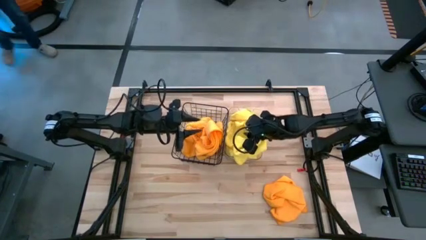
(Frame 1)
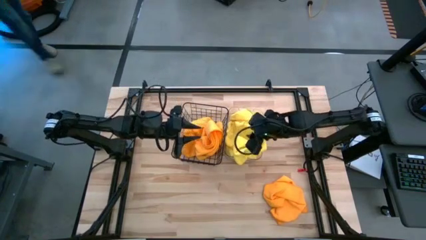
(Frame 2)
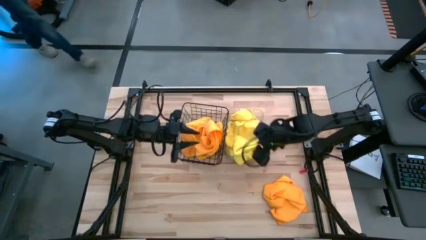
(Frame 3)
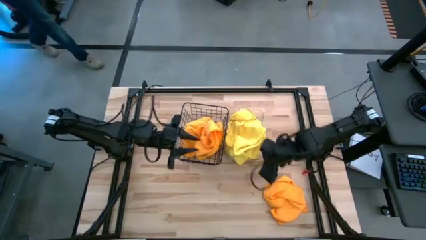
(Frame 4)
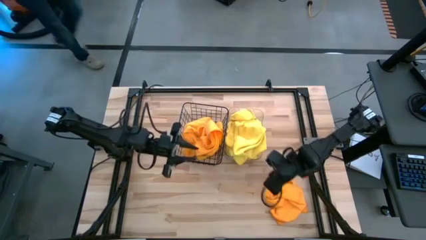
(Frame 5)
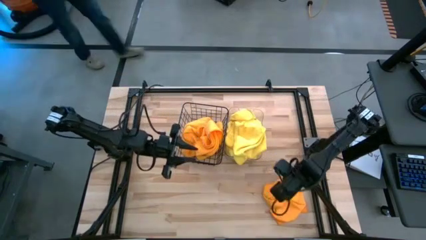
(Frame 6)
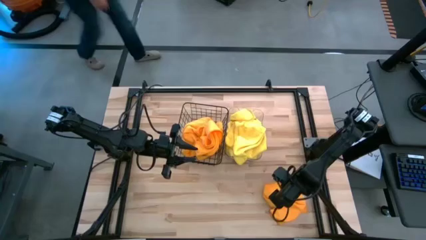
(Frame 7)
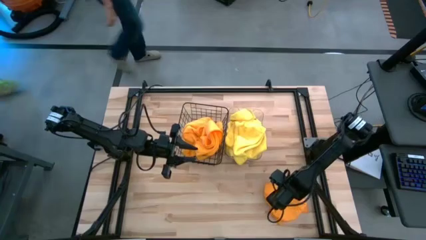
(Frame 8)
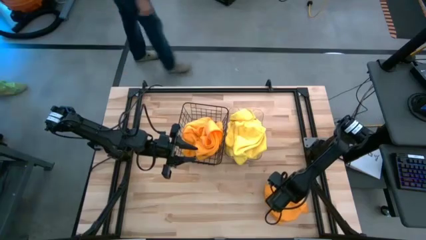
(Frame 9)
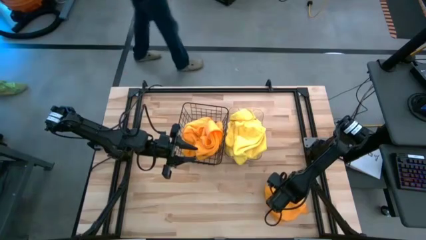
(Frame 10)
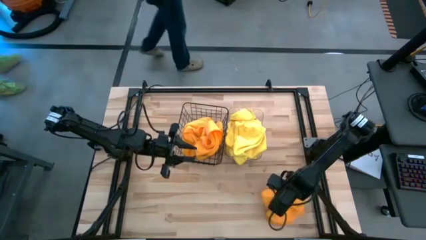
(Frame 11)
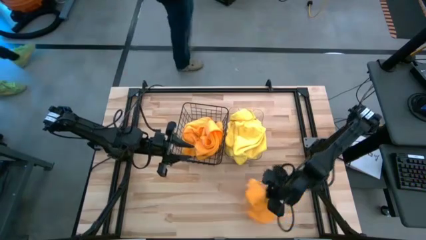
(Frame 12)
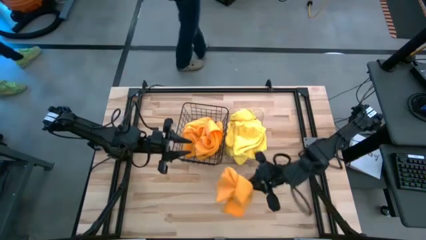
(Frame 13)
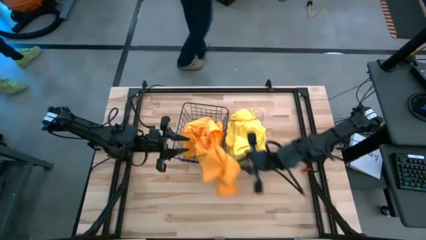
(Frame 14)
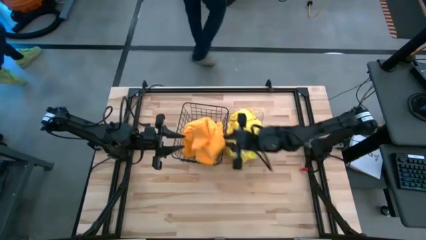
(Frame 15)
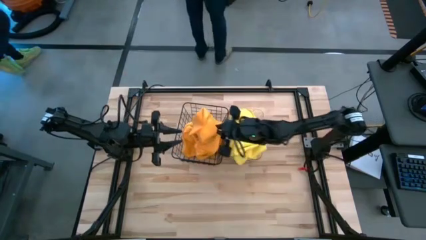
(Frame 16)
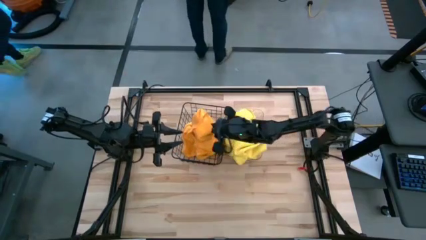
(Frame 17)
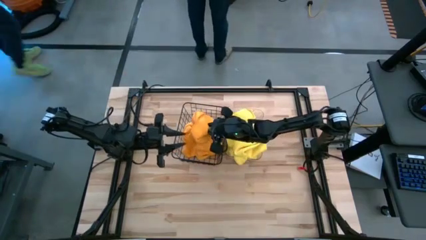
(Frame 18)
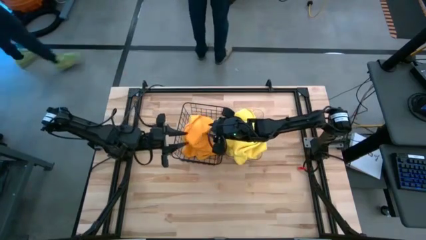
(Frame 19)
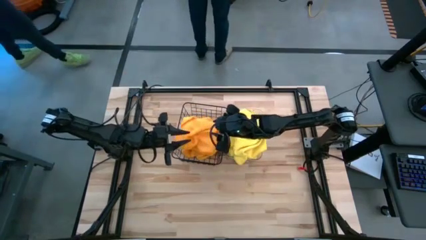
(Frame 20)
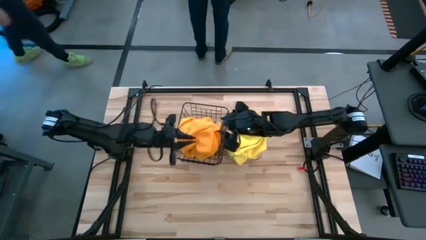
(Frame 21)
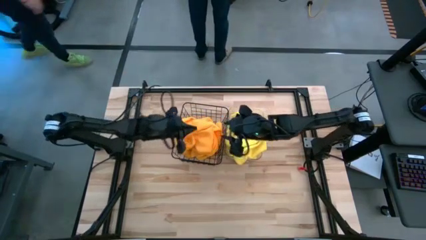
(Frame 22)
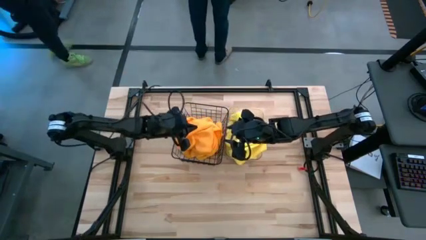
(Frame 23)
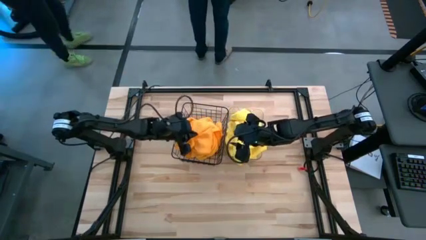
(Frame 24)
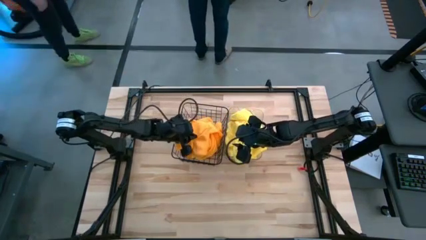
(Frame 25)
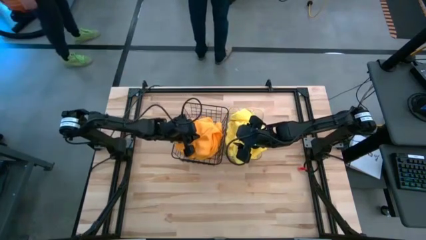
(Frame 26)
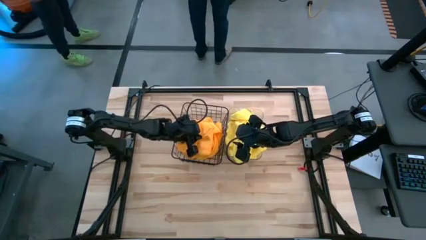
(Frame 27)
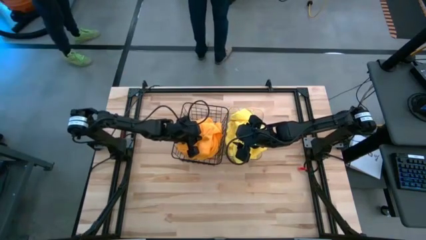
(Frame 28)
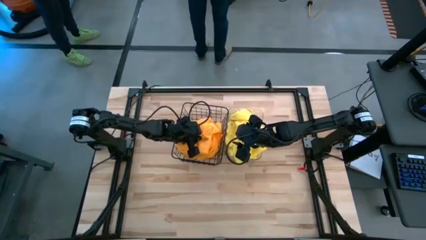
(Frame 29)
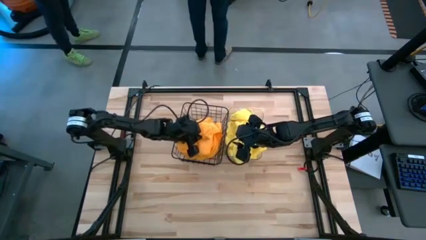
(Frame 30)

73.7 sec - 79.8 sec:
Task: Sort microfiber towel by color & place in baskets
Put the orange microfiber towel into the wire basket

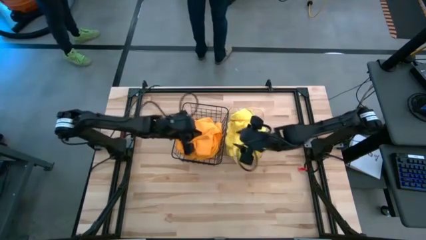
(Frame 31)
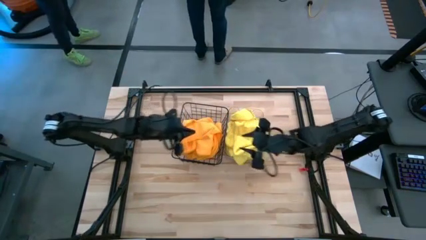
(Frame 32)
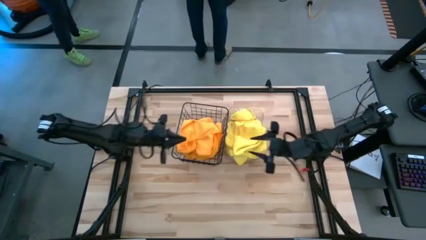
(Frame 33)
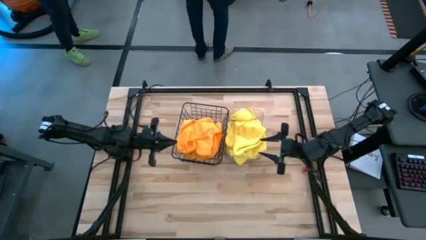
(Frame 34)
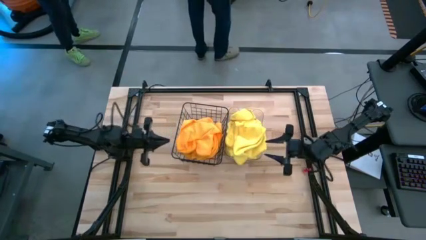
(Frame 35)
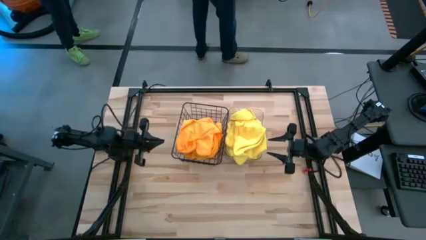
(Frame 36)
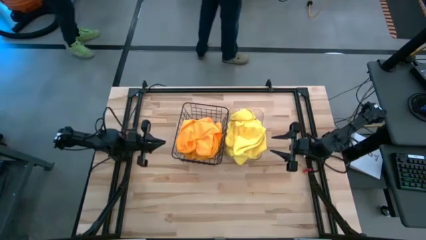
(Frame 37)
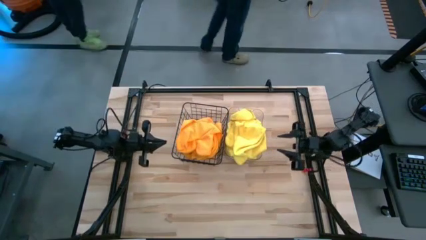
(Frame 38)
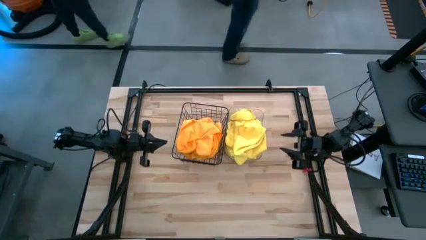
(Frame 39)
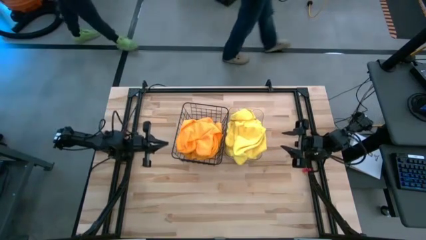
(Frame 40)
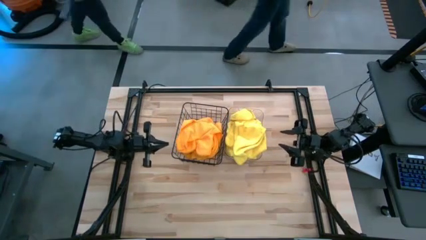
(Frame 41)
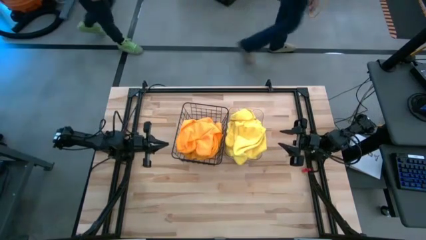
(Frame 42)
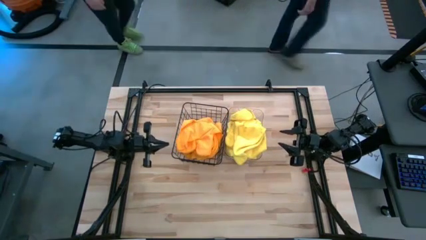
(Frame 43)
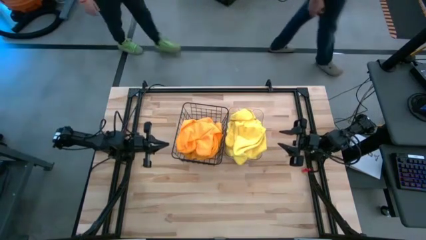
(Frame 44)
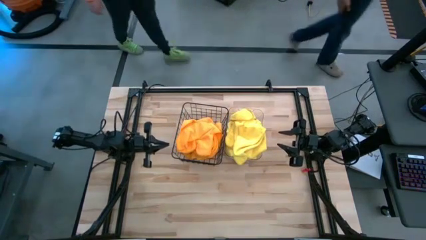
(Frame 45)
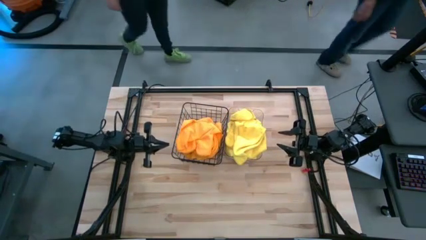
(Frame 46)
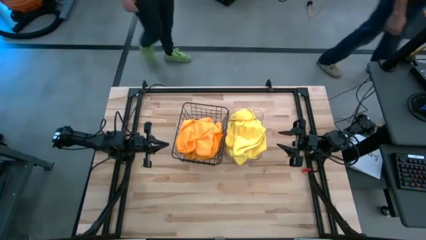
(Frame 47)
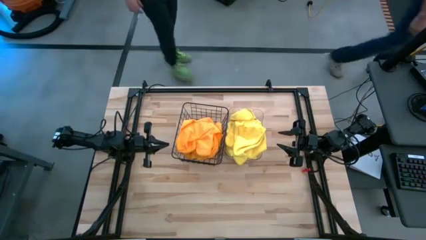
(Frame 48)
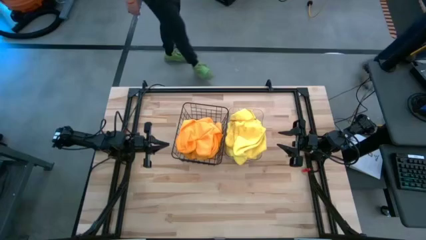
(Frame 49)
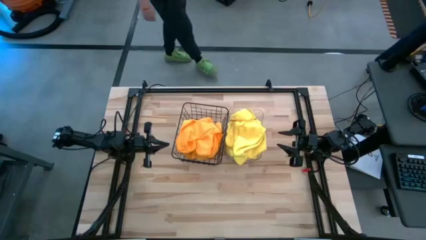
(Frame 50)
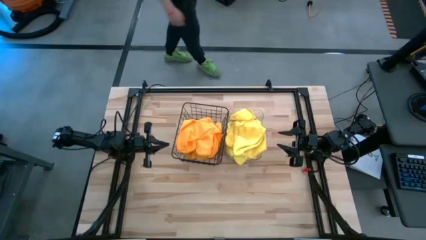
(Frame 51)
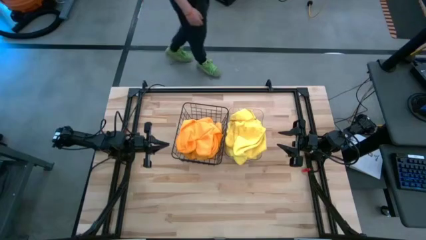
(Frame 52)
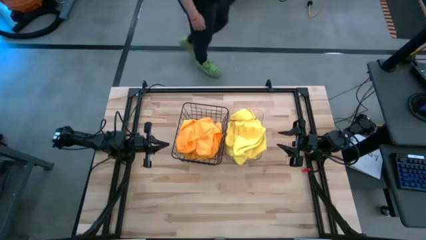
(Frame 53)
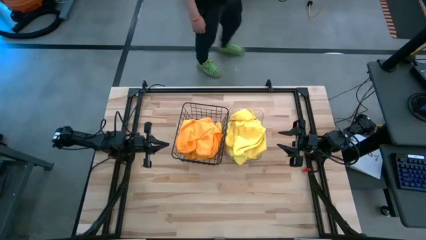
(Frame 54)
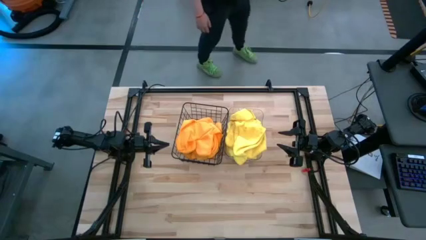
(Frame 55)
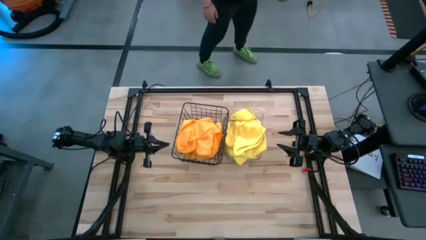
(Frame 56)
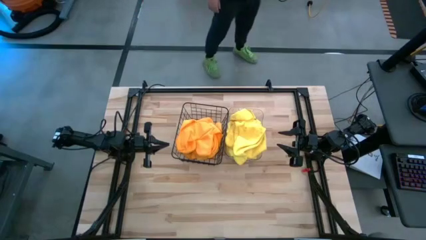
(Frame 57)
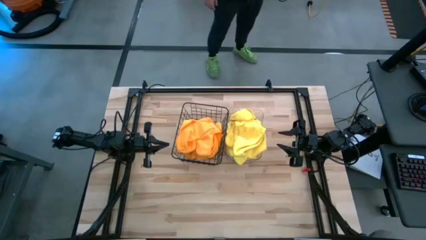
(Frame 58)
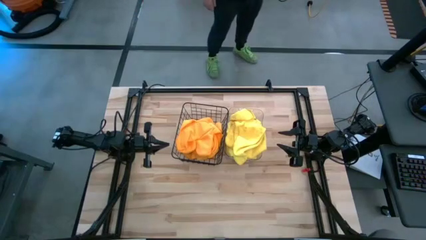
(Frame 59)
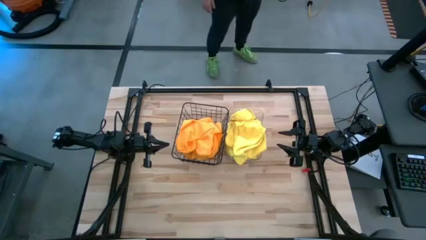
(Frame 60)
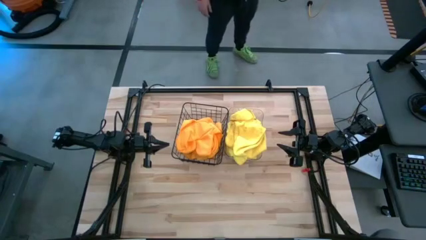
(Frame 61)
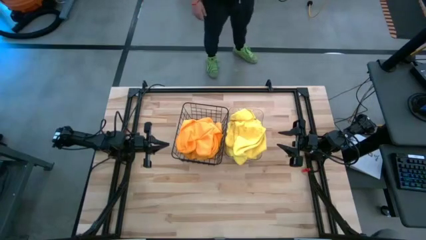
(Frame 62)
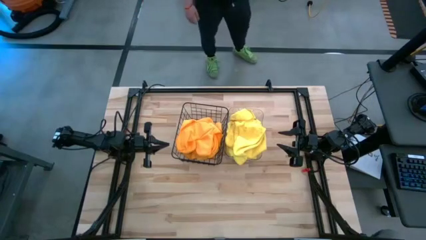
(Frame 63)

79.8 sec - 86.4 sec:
Return to Home Position

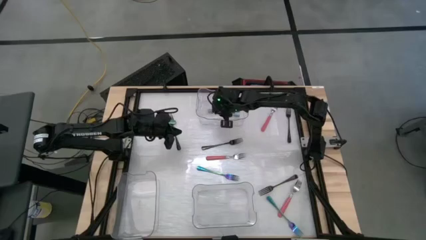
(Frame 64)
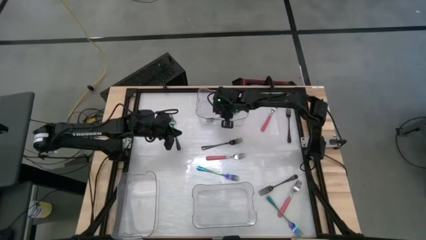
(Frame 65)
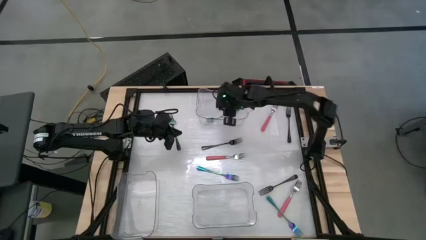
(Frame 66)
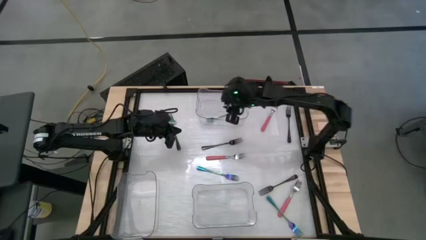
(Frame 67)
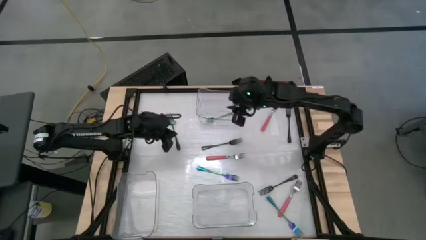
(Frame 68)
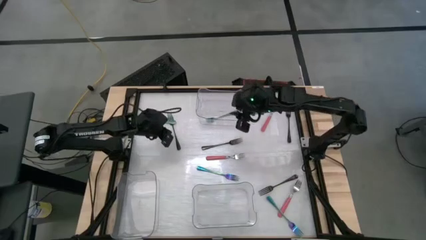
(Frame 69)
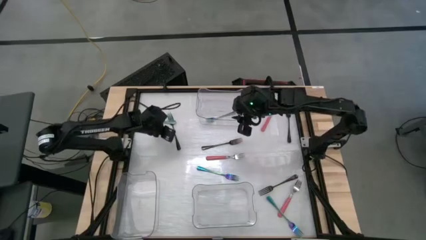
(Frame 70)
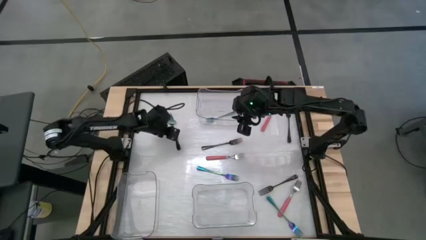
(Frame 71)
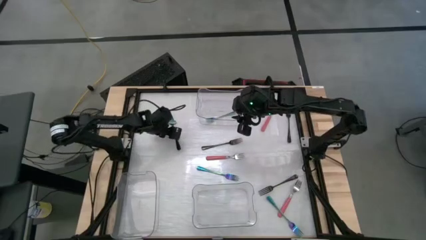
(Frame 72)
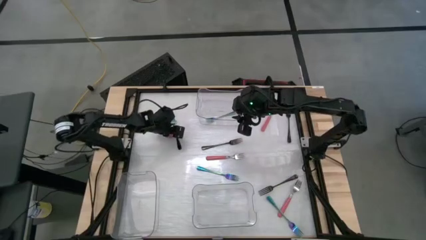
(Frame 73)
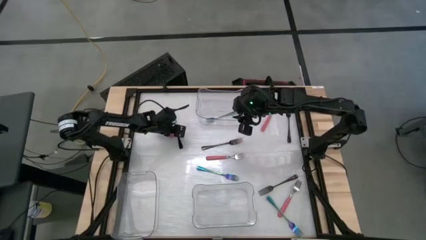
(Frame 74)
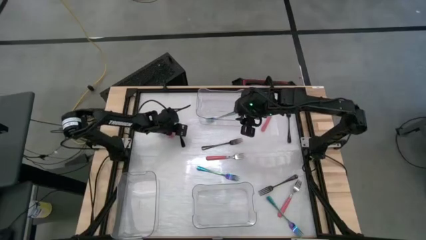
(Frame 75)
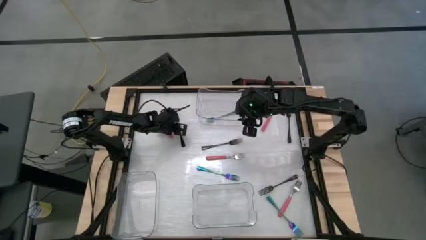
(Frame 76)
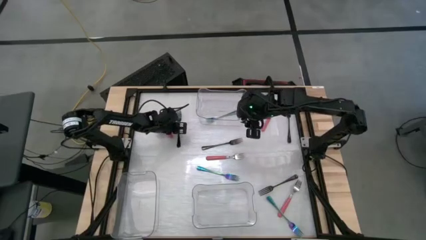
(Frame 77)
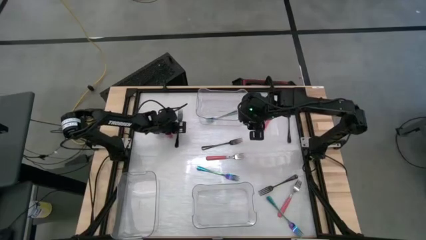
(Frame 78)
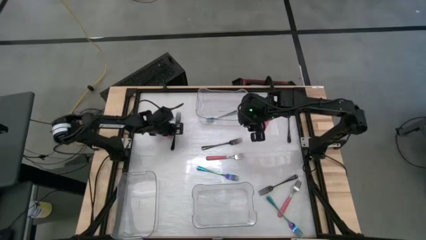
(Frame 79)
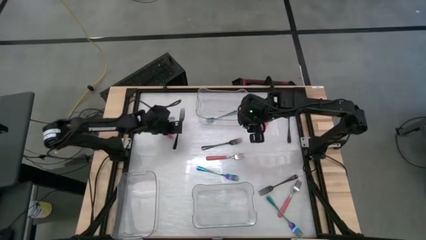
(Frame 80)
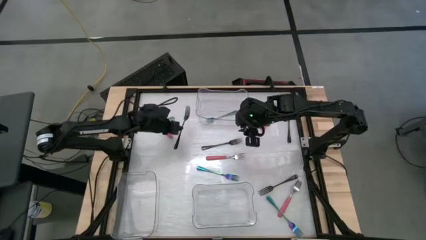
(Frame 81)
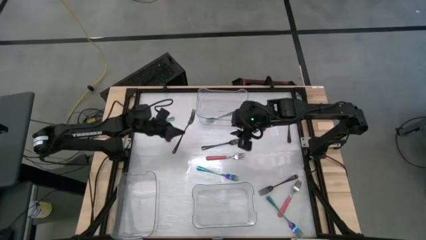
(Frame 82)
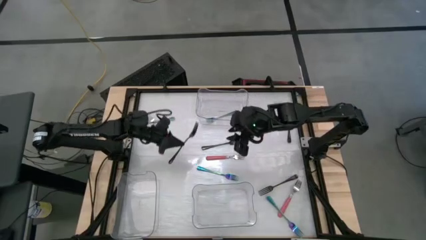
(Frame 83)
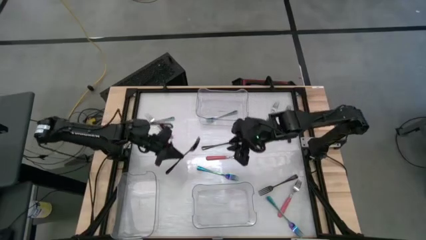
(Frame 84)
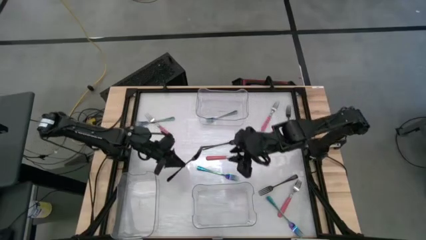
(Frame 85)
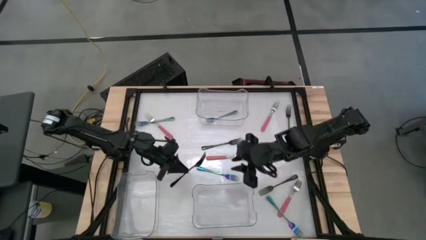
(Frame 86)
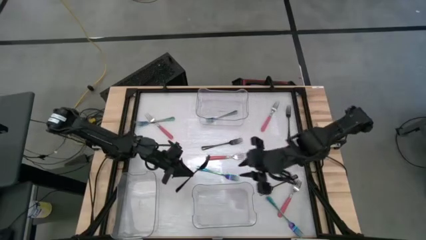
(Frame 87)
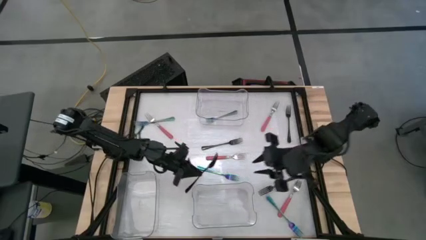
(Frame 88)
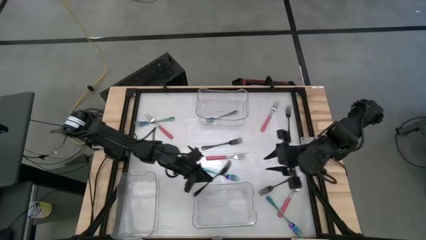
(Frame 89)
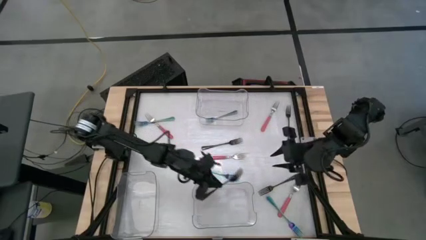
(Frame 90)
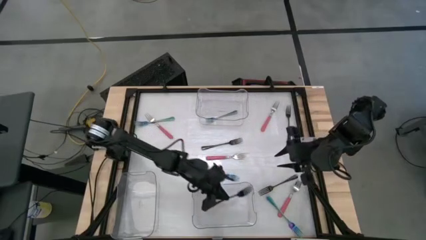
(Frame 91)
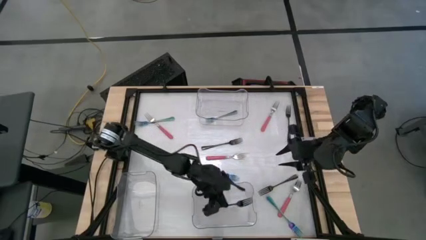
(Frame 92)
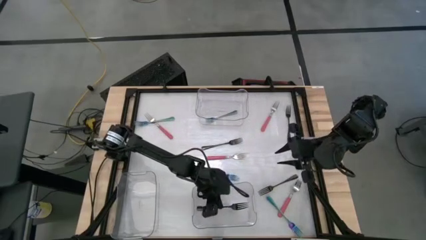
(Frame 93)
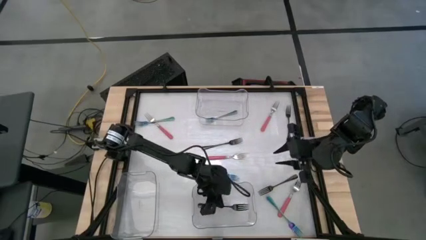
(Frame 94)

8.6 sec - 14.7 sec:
Task: Sort silverware by color (type)
Put the black fork into the bottom right transparent bin
